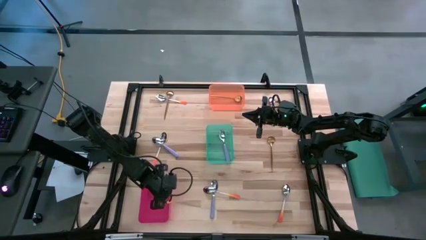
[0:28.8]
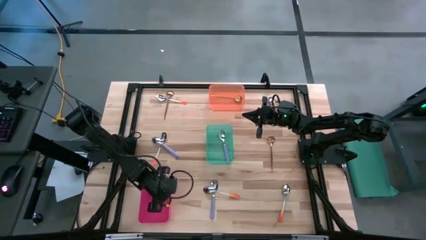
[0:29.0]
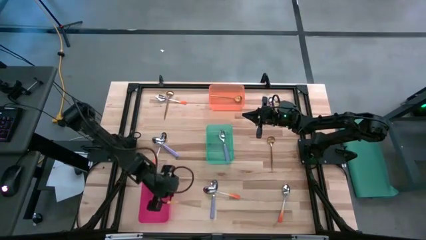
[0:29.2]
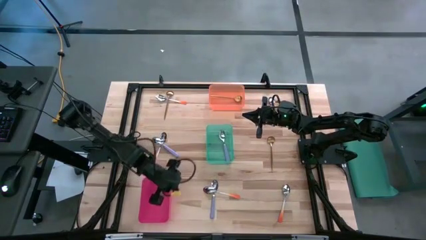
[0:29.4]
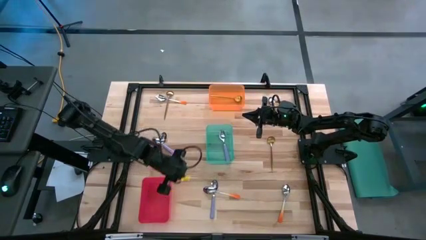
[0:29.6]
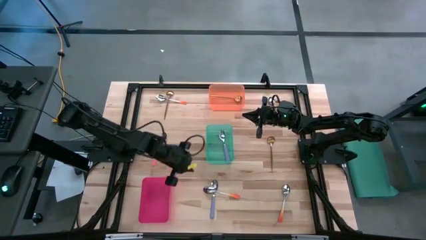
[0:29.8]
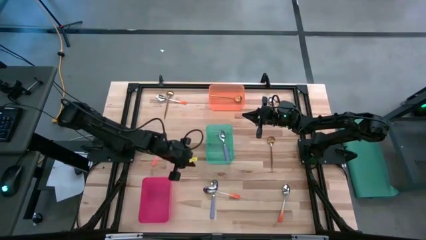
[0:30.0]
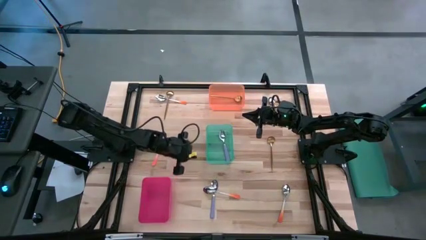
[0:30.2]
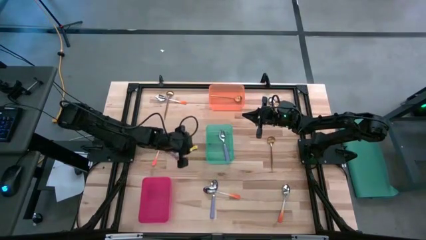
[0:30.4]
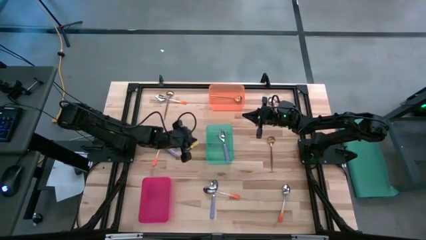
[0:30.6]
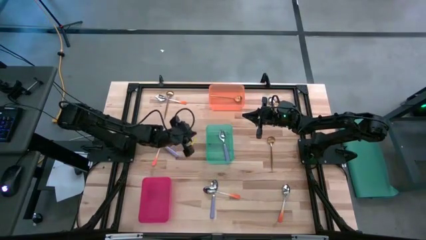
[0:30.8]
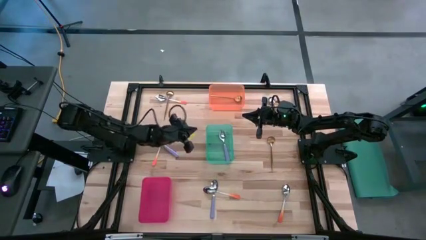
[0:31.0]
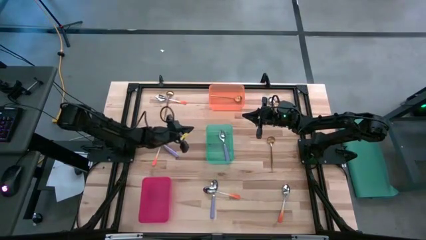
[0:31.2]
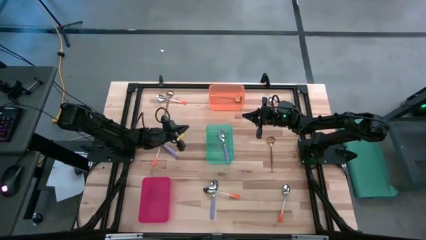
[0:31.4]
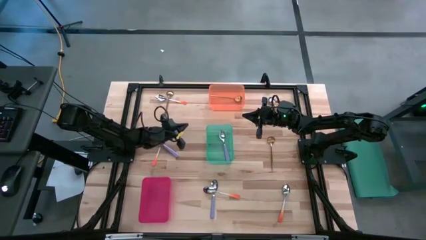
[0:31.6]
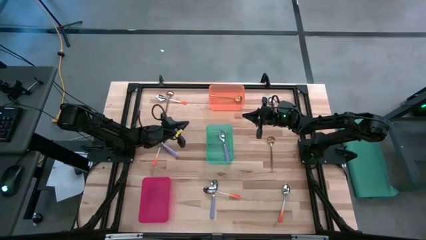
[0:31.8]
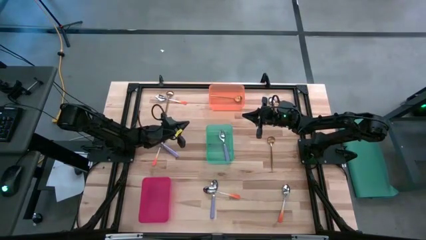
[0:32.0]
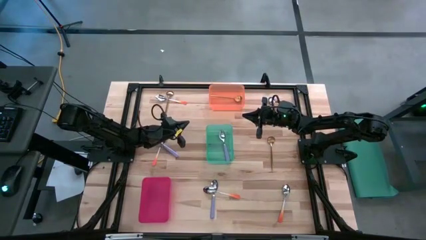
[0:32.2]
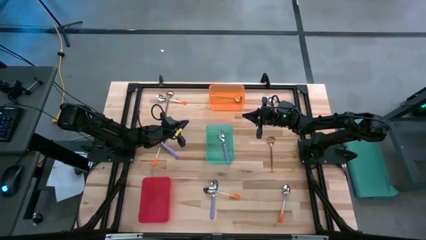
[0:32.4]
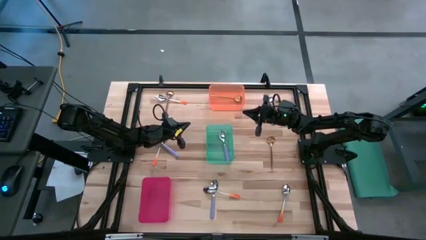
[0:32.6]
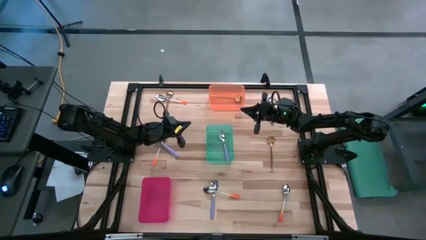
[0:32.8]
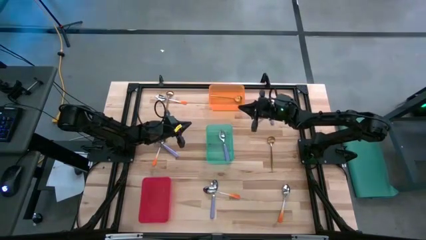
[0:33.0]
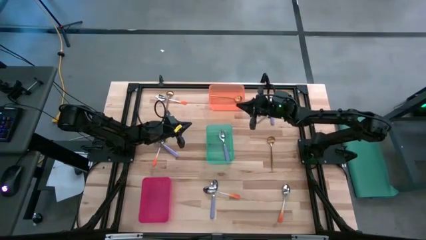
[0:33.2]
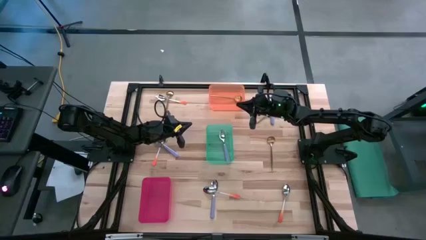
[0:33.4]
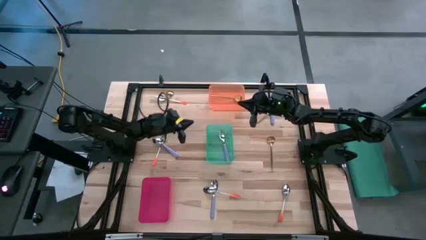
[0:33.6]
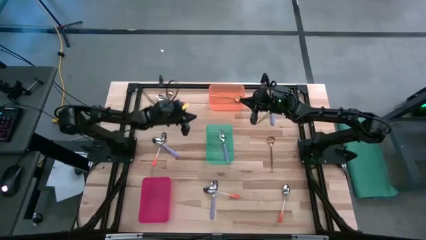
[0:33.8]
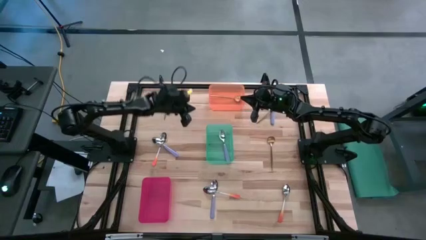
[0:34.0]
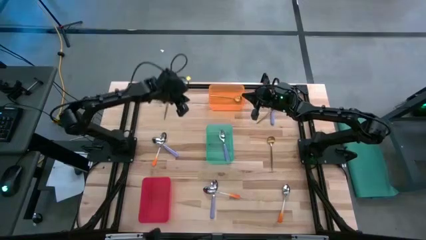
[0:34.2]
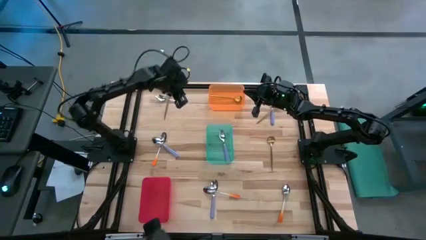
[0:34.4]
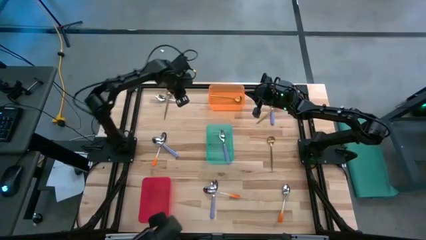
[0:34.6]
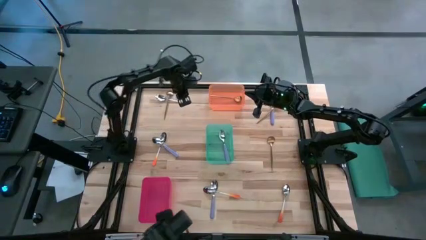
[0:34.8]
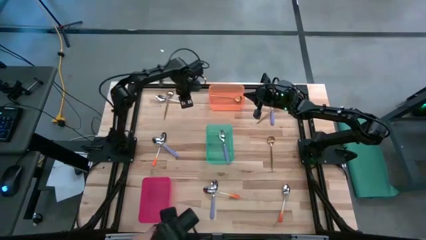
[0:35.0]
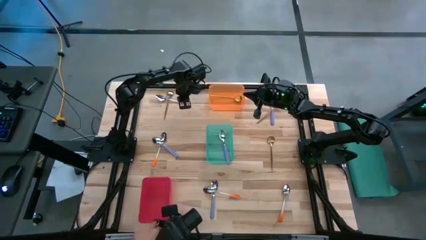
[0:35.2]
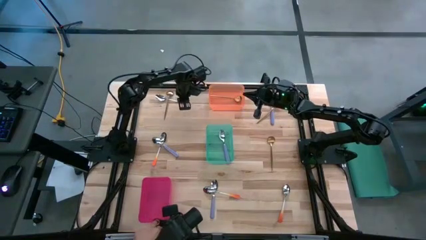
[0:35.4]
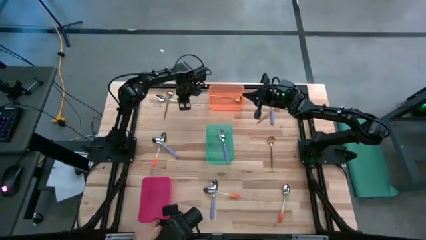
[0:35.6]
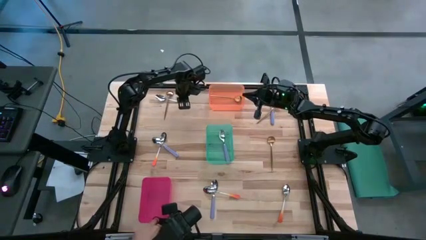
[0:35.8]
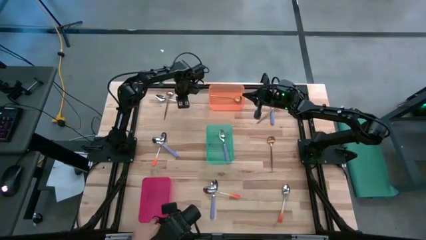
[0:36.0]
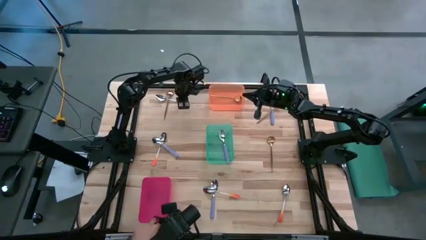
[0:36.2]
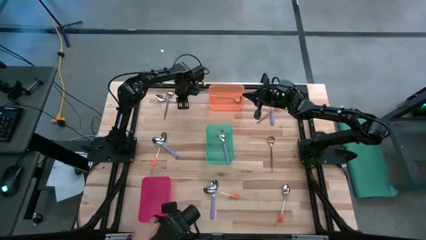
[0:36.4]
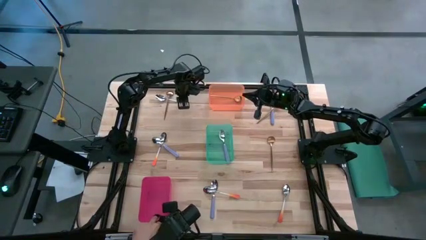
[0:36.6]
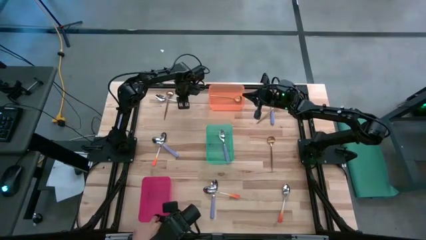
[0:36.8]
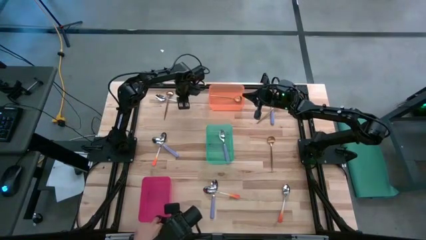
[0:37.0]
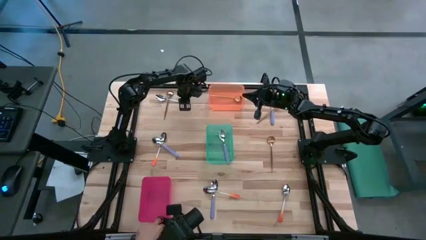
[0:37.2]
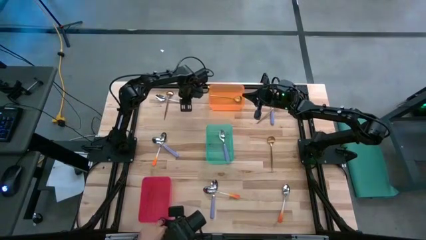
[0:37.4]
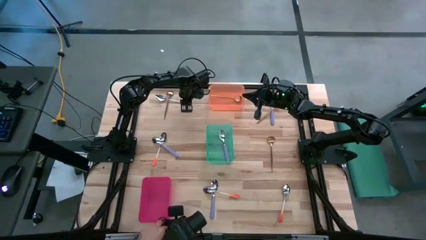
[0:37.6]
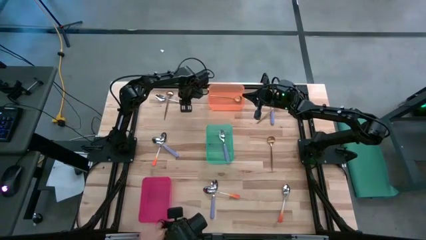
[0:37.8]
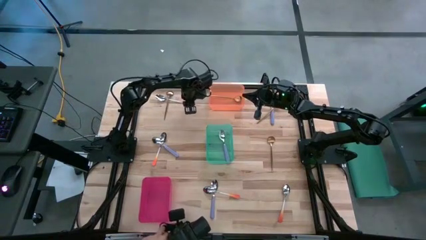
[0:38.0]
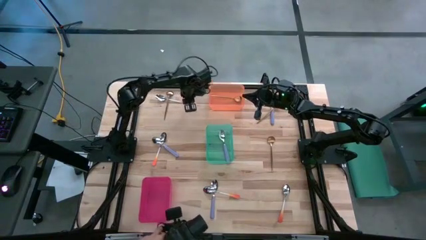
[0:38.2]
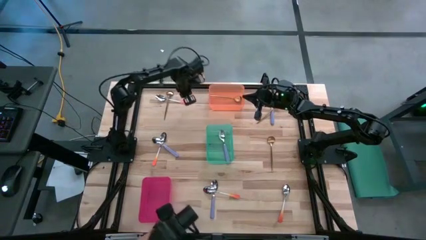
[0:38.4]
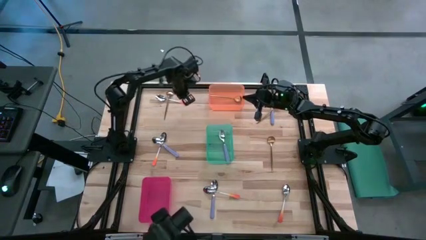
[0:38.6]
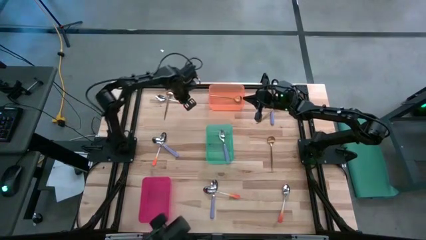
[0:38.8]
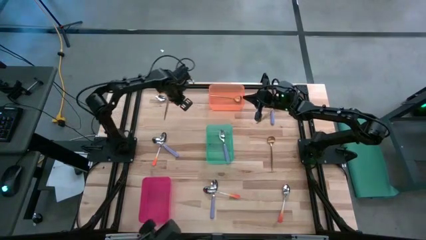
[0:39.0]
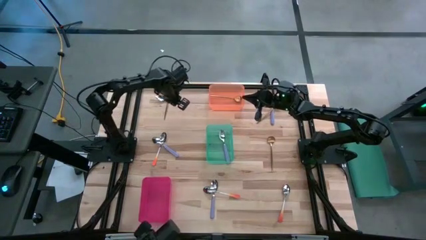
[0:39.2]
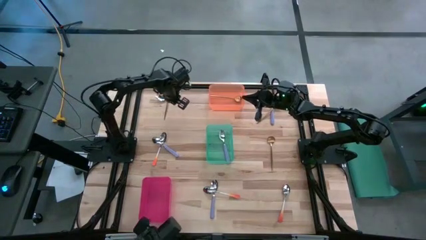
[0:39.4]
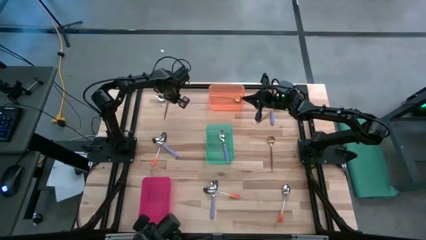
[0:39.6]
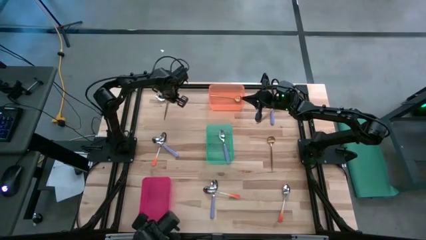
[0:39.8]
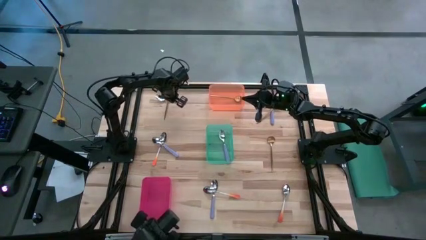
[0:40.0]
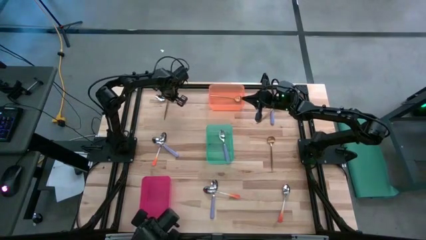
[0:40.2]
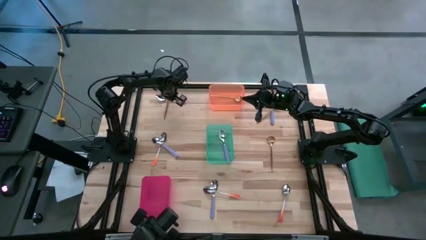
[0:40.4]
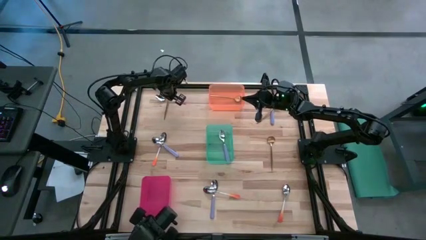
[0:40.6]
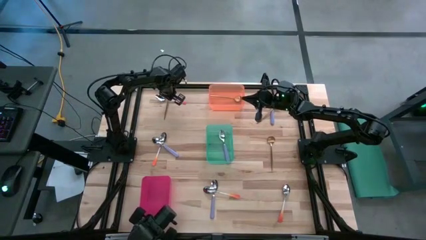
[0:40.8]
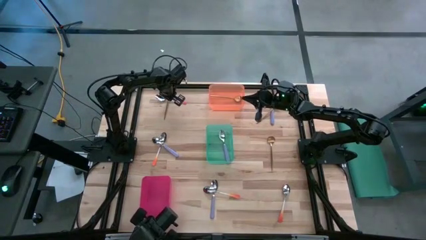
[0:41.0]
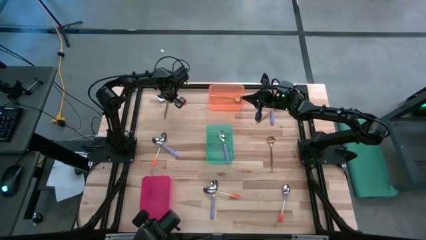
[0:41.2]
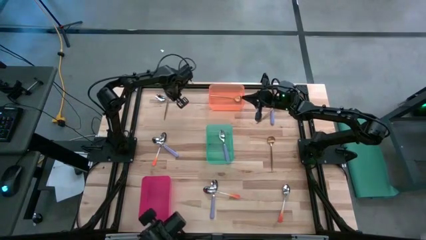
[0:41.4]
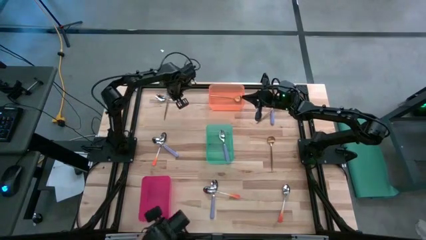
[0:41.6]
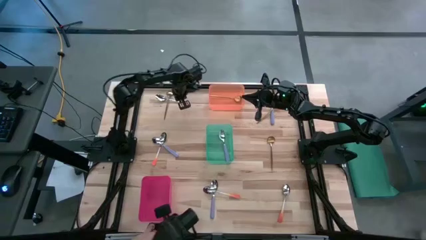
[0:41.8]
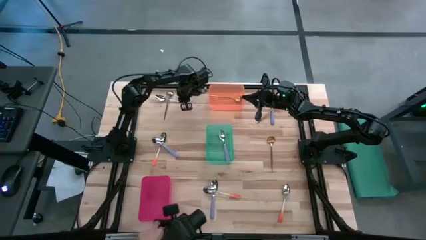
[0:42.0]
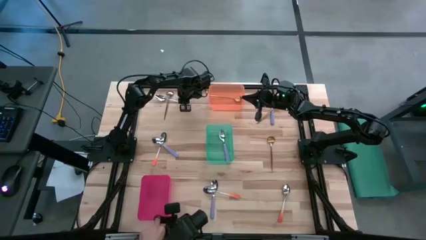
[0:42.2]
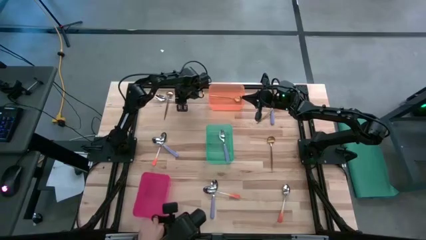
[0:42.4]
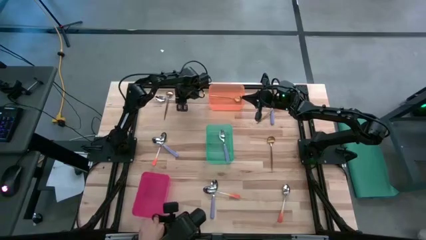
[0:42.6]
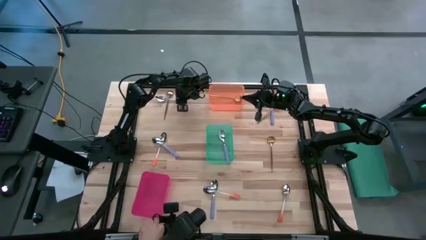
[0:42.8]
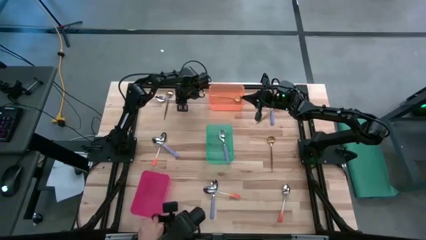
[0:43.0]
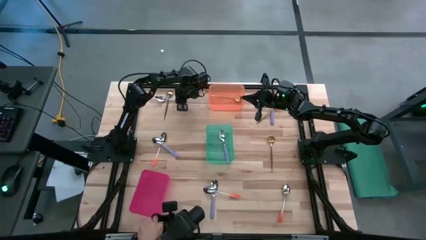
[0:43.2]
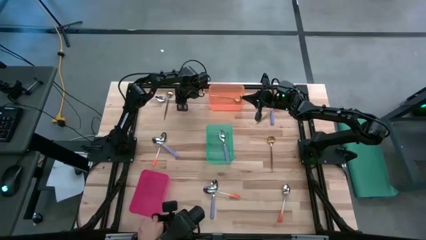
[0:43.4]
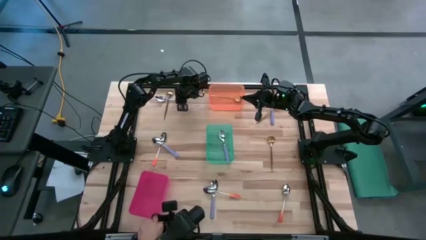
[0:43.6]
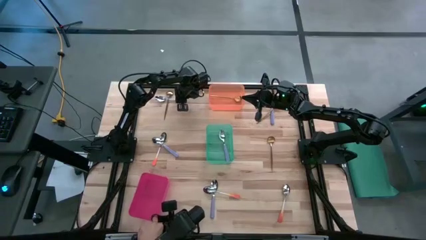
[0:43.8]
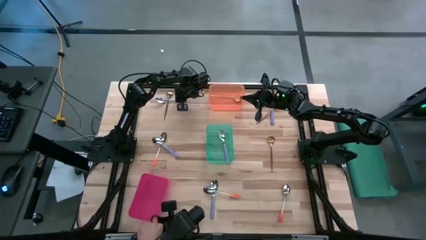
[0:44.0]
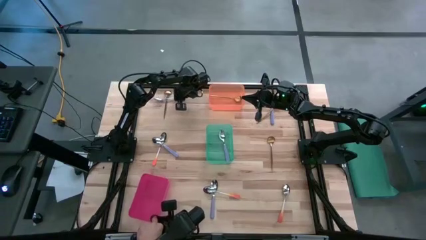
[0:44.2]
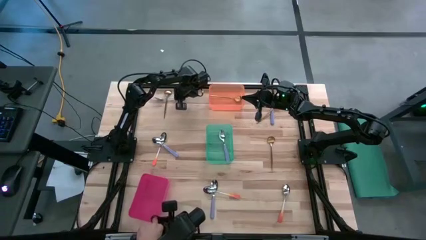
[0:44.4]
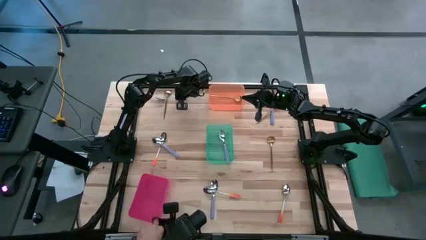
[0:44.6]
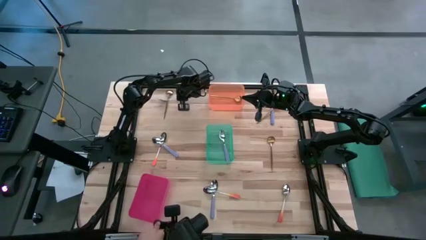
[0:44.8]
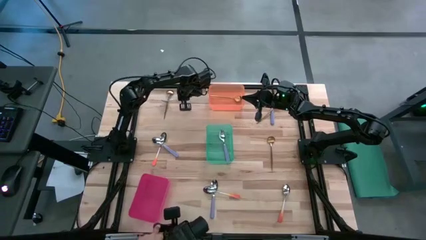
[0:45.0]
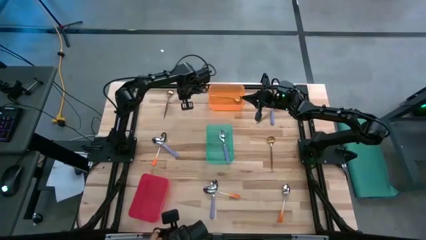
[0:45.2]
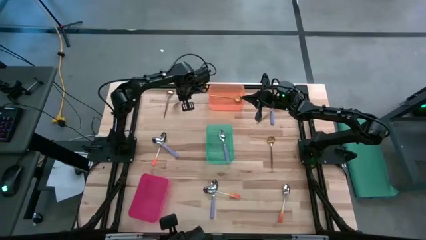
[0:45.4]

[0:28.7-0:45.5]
Task: Sort silverware by color (type)
Put the orange spoon into the red bin
